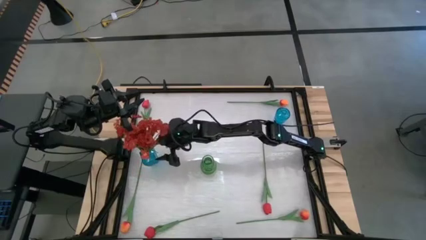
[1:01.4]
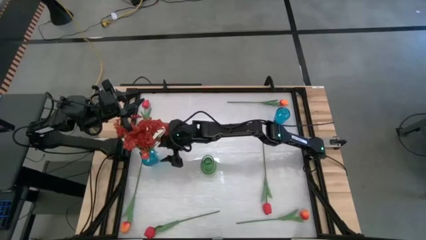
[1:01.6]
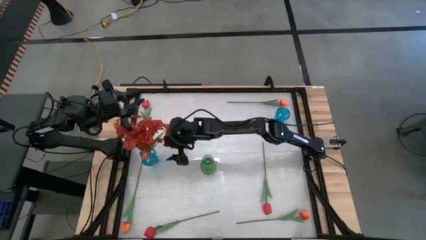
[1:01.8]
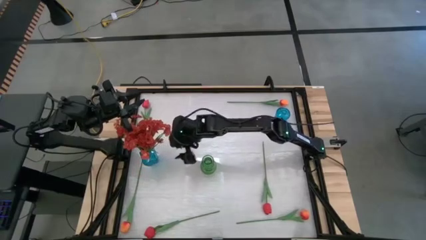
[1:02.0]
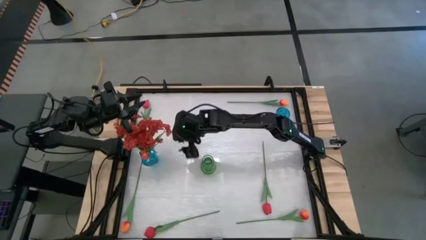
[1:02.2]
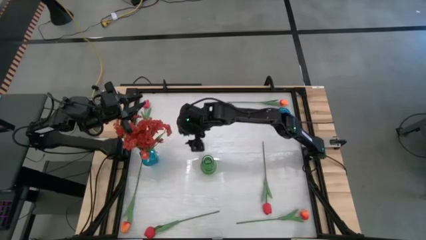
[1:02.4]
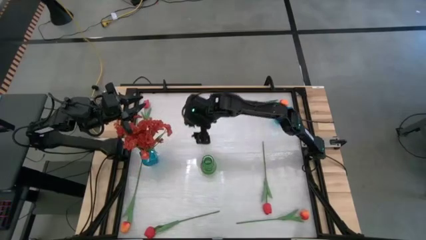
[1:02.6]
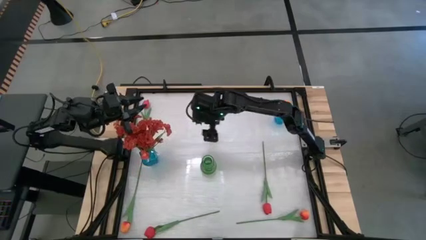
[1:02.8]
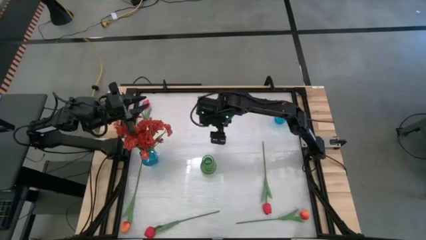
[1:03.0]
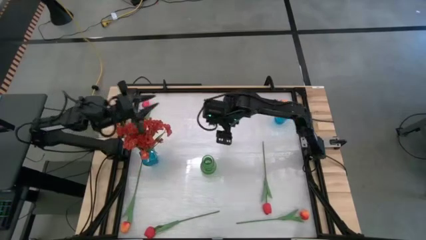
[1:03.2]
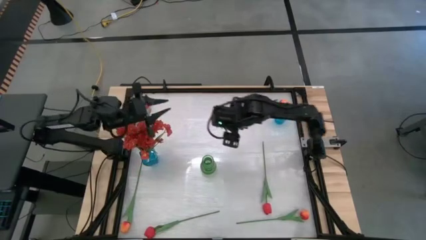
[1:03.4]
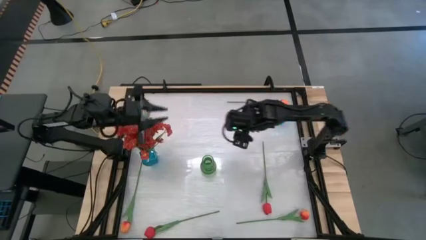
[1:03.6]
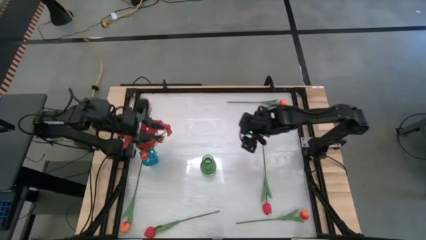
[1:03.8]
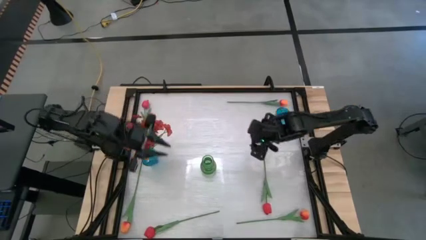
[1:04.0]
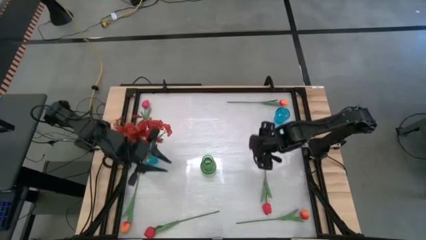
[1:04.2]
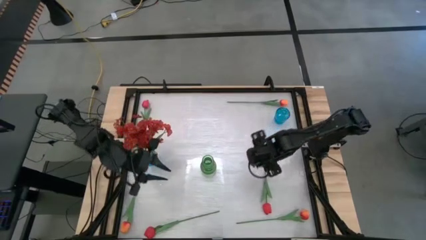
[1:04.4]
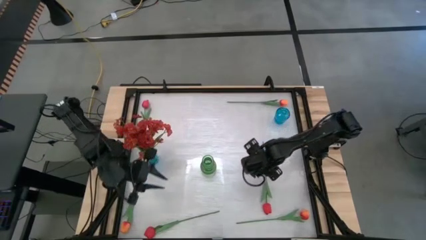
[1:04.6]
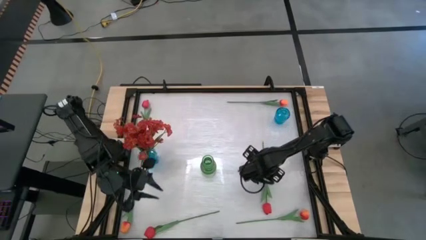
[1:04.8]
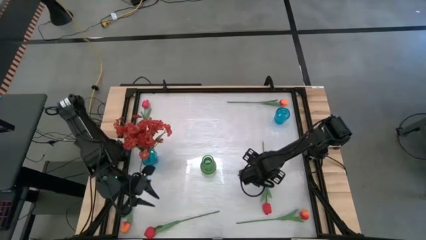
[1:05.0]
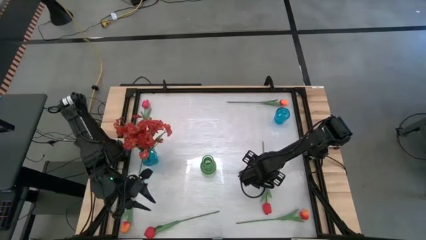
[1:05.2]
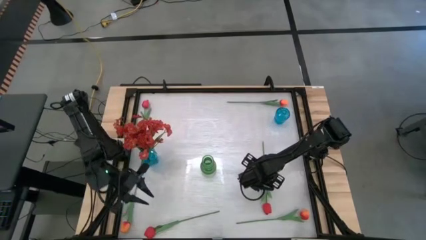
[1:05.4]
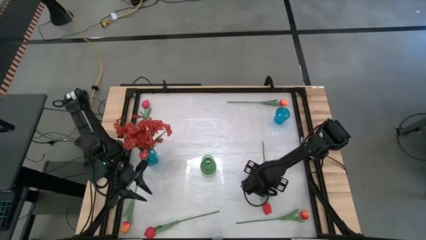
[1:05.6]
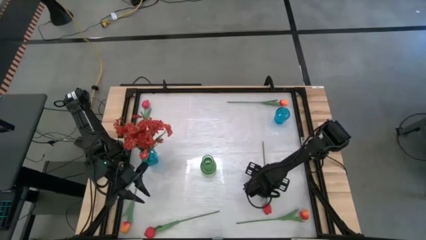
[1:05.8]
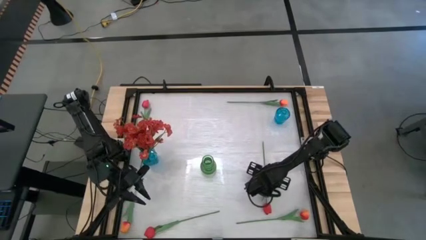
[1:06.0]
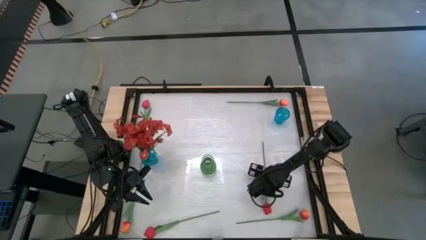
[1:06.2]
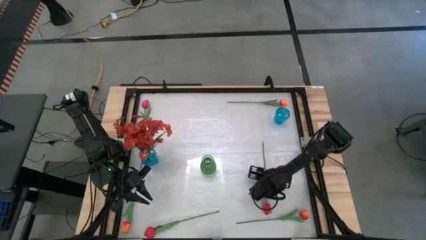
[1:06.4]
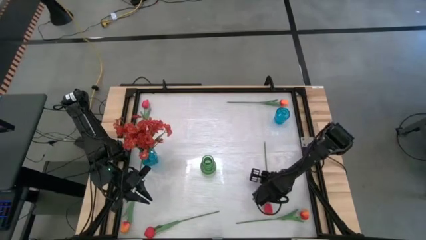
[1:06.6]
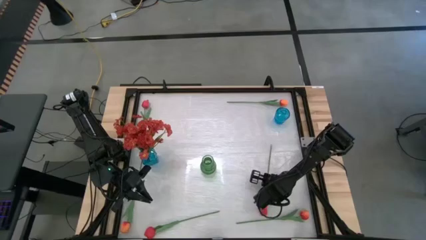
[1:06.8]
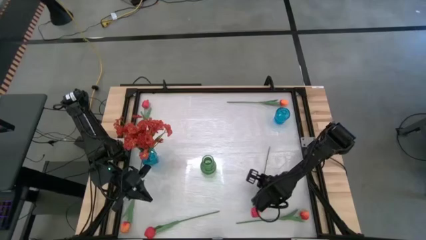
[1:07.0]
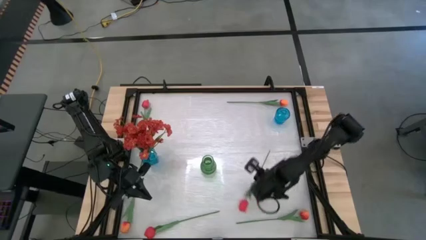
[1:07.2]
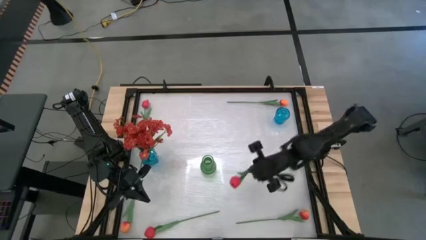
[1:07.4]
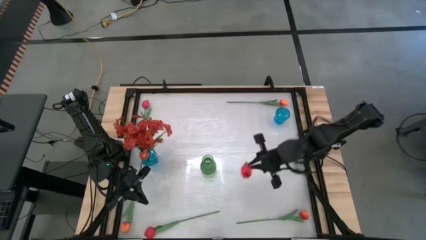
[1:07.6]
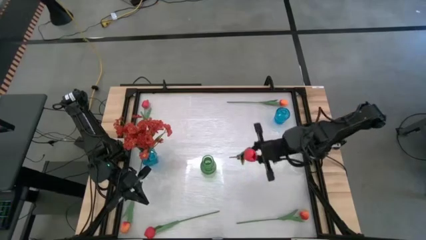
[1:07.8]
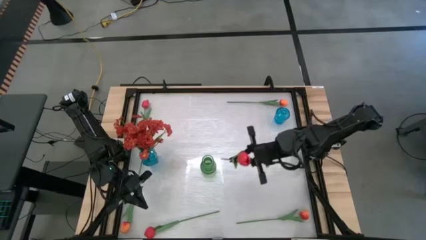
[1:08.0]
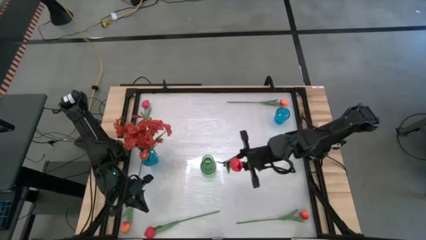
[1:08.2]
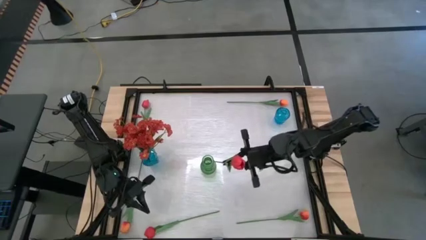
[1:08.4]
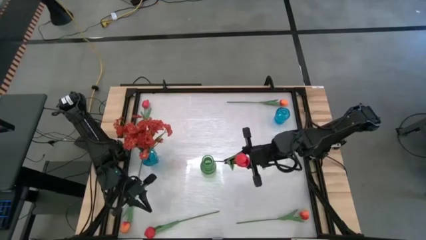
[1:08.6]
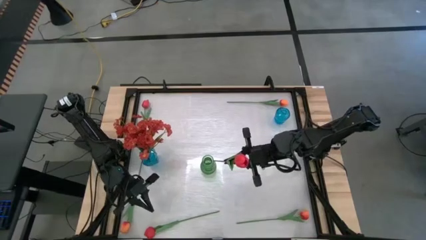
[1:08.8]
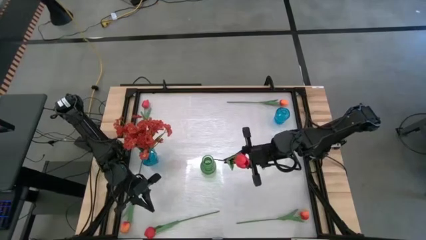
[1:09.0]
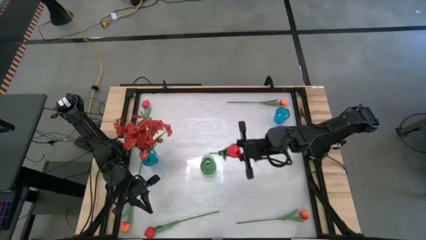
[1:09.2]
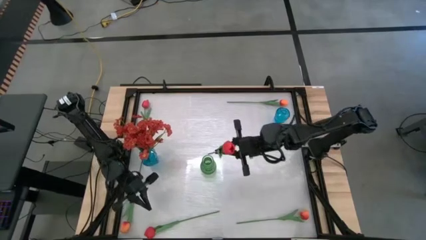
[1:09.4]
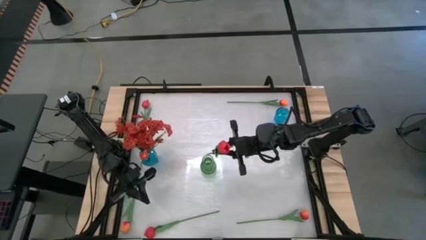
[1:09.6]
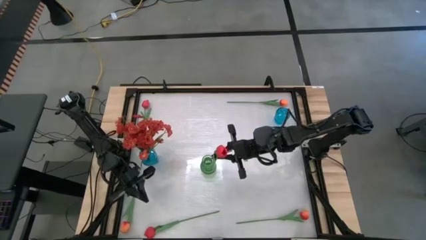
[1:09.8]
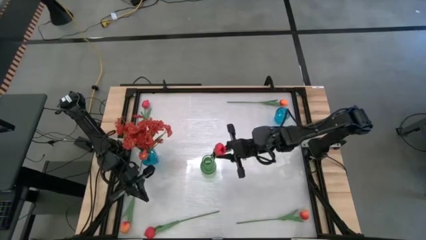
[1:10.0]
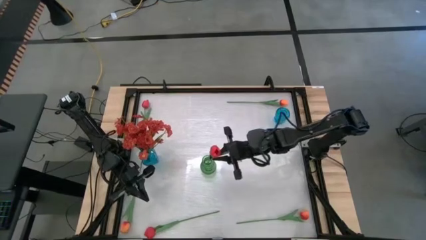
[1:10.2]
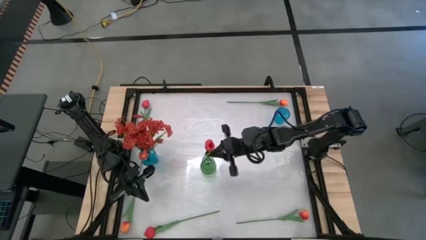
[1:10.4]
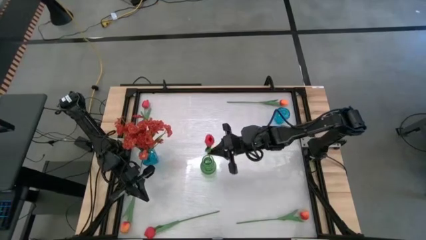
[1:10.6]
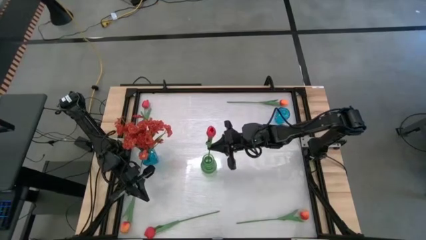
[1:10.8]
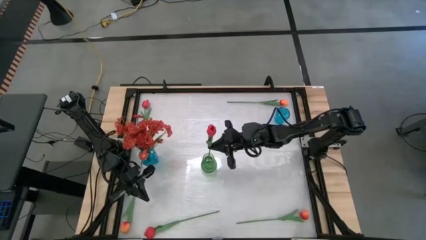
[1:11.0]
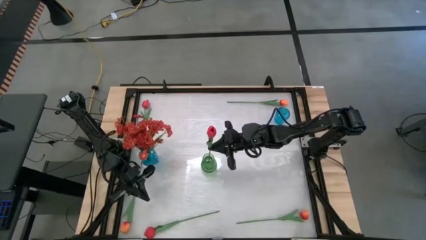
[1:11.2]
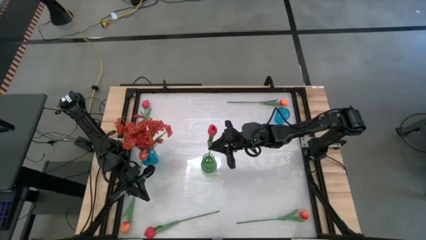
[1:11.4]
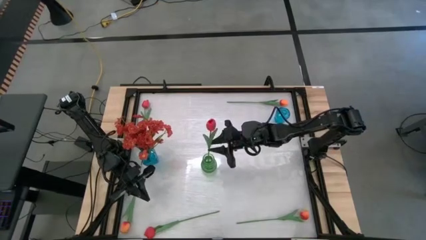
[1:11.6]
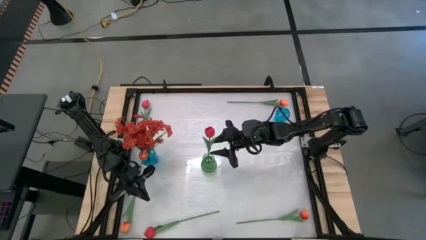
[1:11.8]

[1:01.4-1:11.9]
Task: Sort flowers into vase by color
Put the bottom right pink flower into the green vase

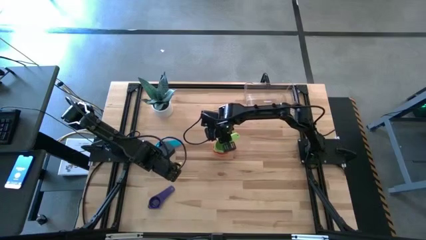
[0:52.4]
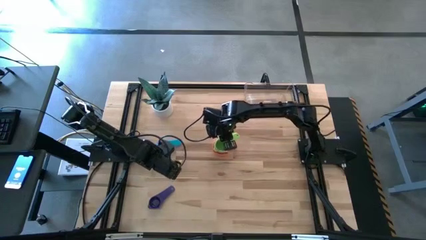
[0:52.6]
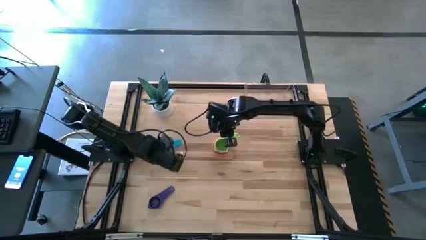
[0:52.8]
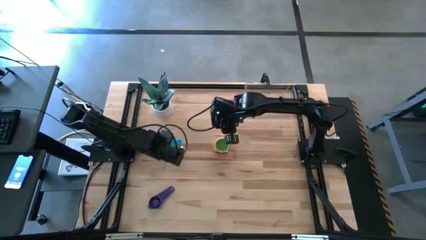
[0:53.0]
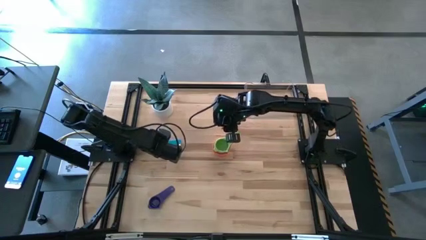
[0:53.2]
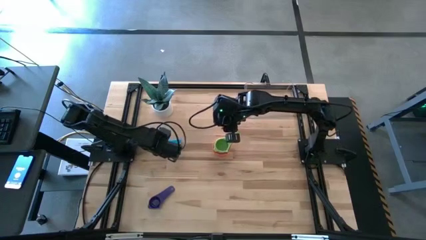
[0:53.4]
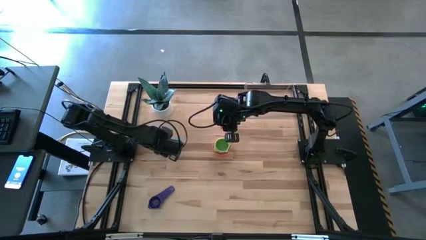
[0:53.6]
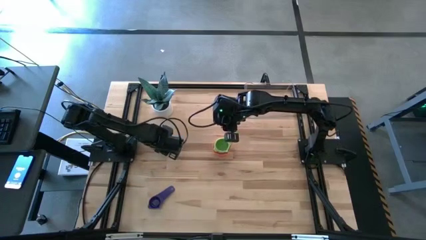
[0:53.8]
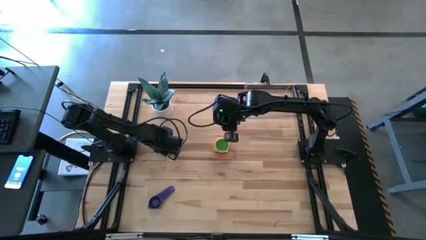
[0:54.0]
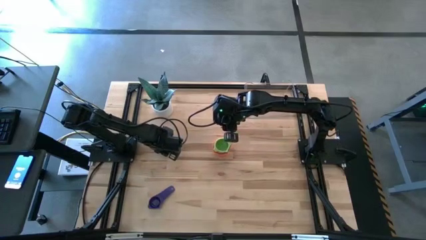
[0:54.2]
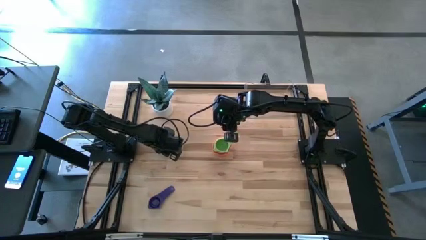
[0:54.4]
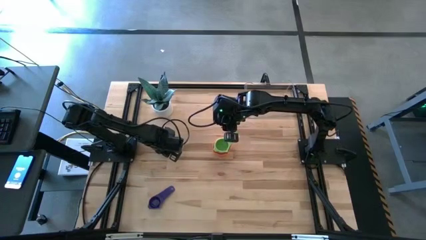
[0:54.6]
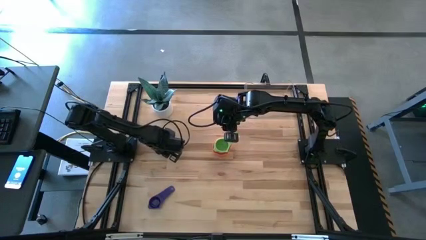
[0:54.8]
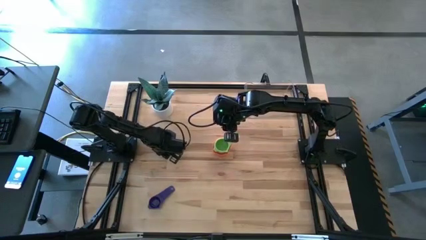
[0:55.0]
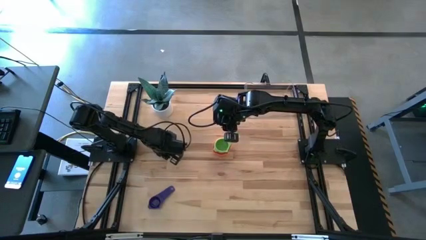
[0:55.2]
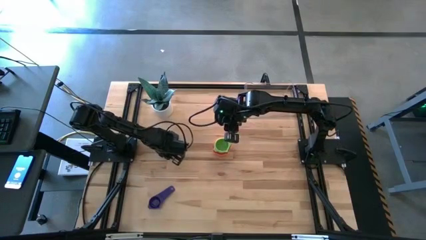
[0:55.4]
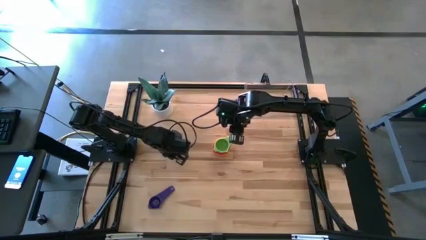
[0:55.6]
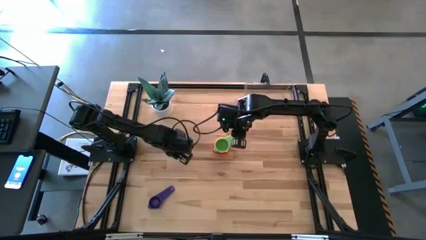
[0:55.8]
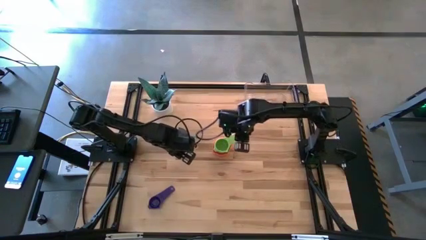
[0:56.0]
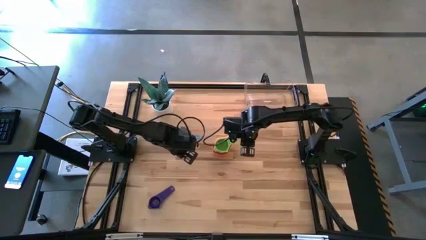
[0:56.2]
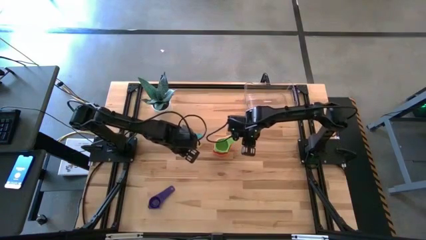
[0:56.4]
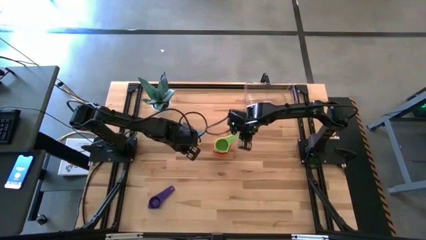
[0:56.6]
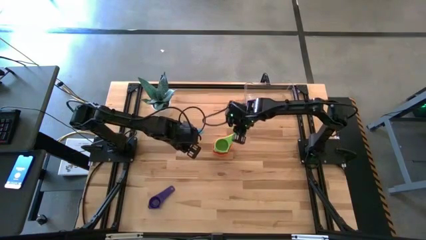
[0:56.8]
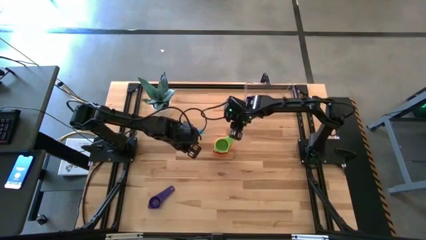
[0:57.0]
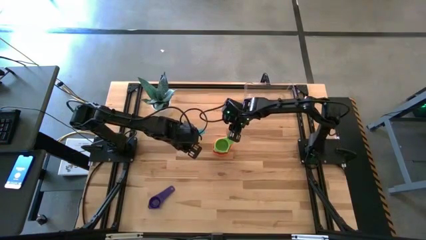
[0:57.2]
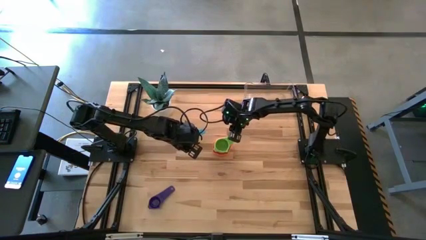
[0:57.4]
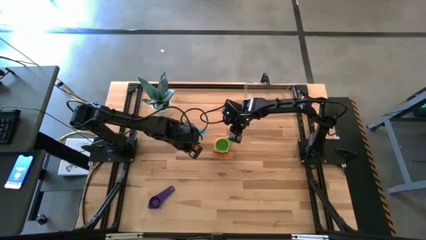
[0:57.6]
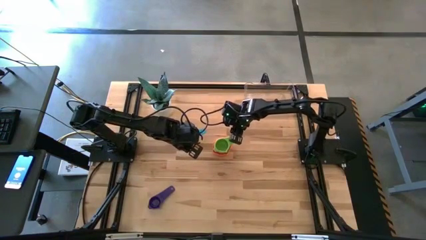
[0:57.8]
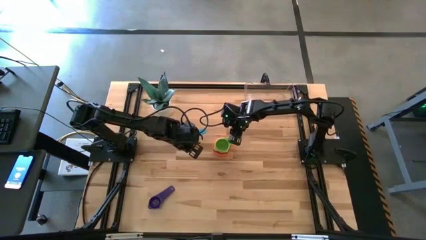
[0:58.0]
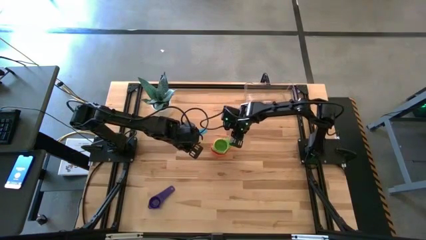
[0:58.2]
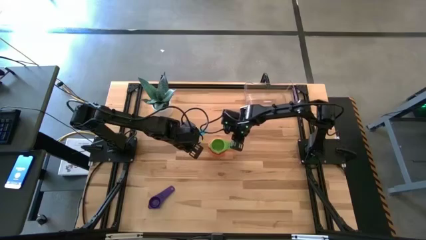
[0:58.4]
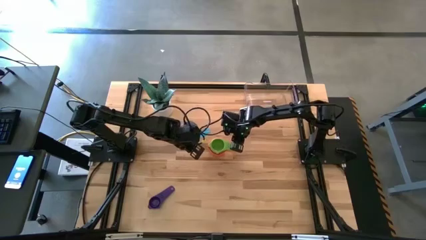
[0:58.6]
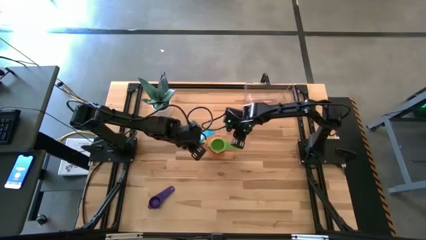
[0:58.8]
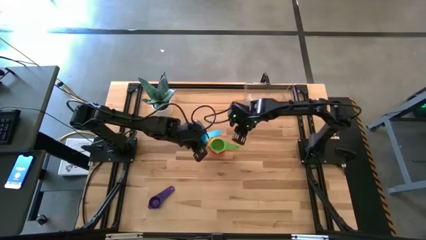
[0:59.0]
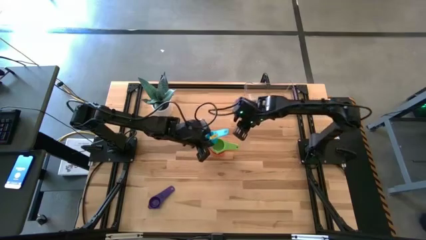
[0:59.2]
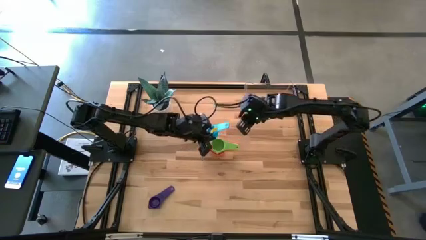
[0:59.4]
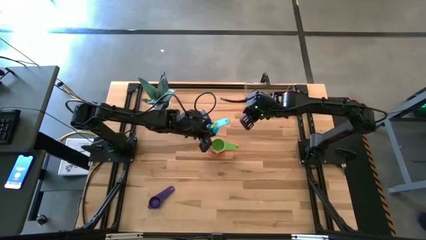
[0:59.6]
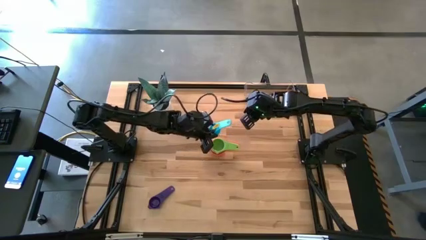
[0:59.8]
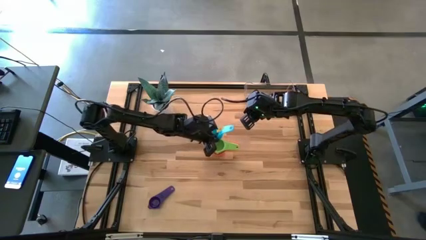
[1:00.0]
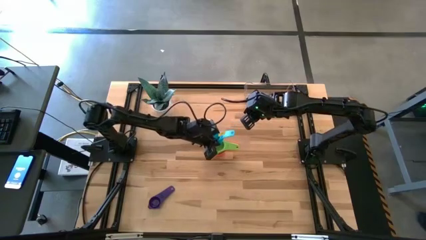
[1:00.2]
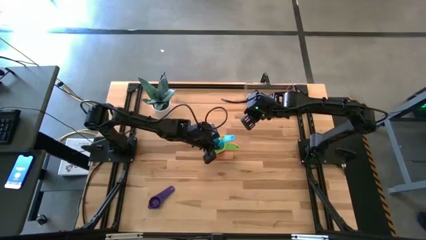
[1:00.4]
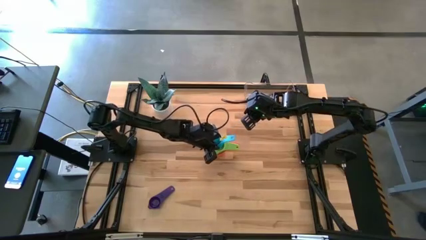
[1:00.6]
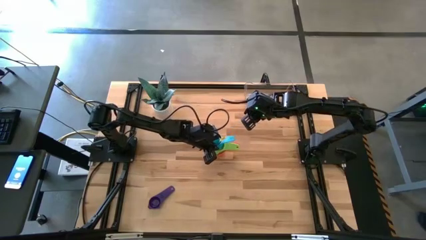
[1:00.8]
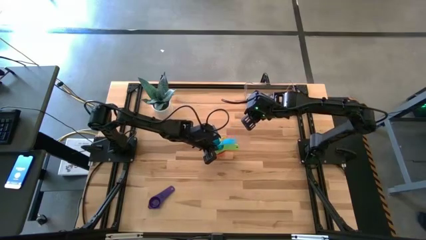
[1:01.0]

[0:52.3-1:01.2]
Task: Nest measuring cups in basket
Stack the light blue measuring cup on top of the green measuring cup
